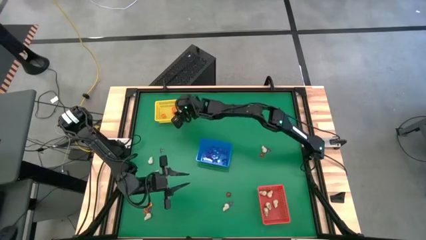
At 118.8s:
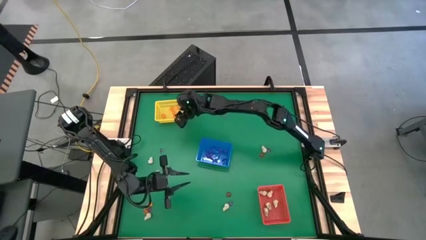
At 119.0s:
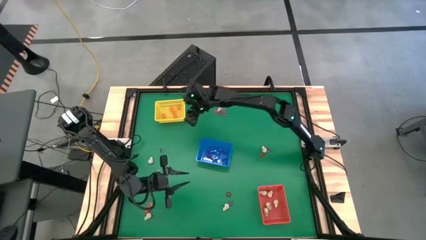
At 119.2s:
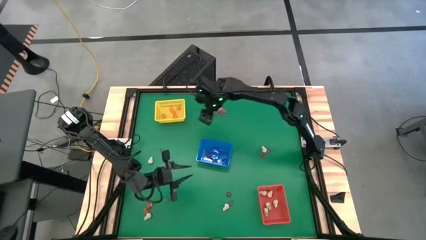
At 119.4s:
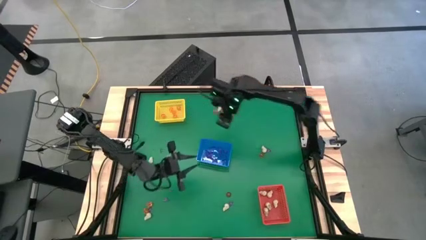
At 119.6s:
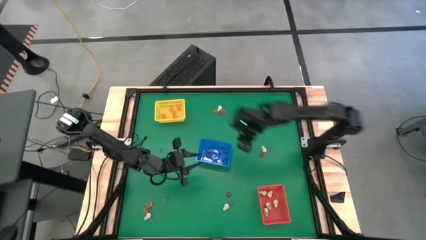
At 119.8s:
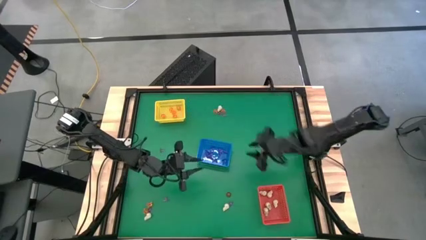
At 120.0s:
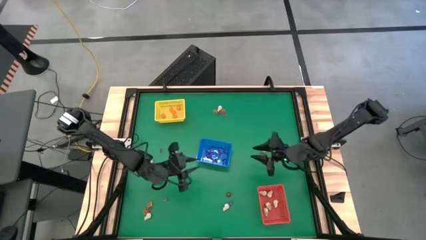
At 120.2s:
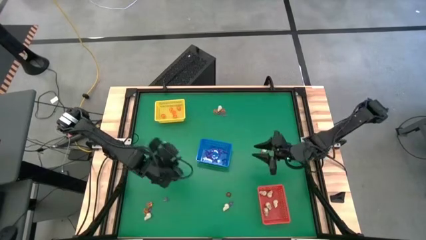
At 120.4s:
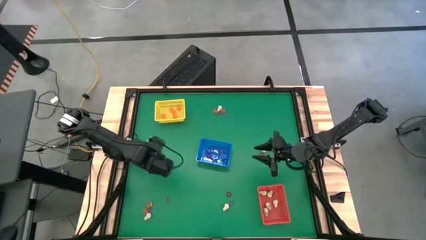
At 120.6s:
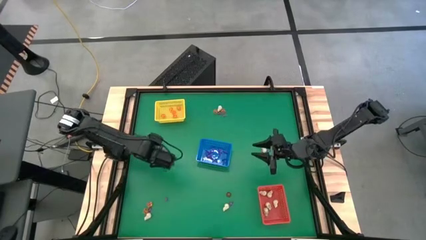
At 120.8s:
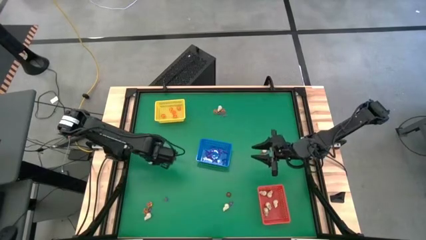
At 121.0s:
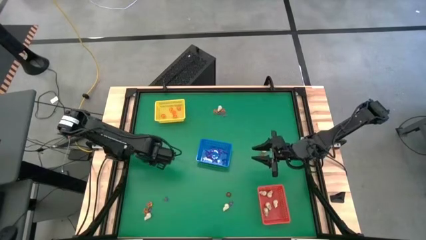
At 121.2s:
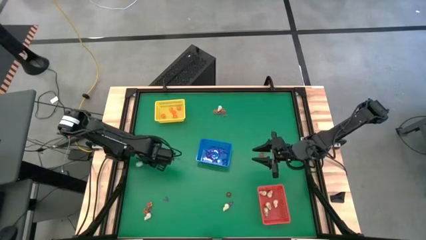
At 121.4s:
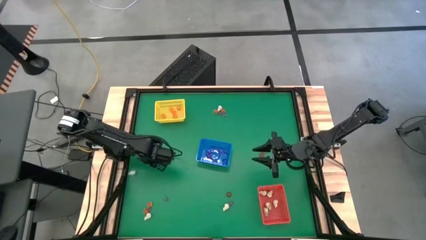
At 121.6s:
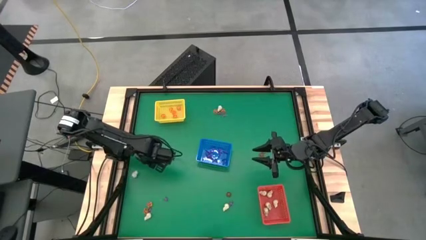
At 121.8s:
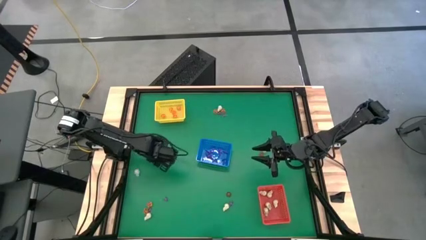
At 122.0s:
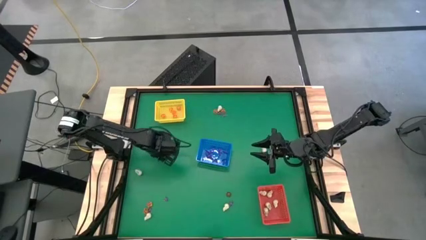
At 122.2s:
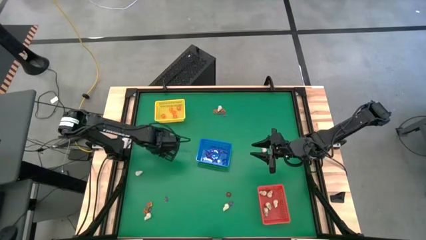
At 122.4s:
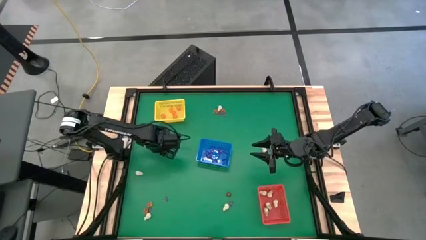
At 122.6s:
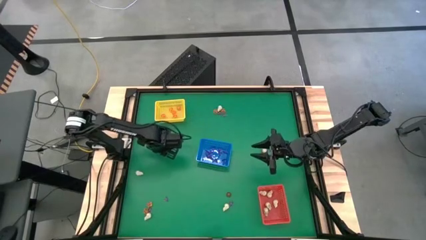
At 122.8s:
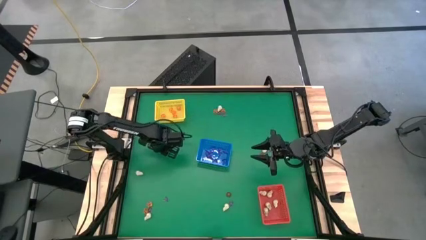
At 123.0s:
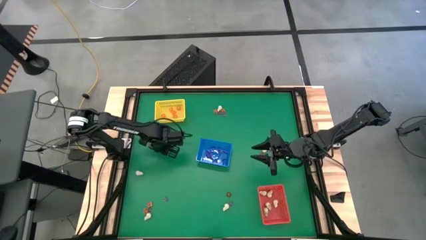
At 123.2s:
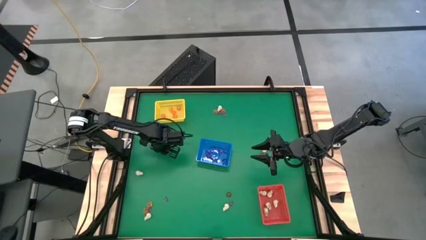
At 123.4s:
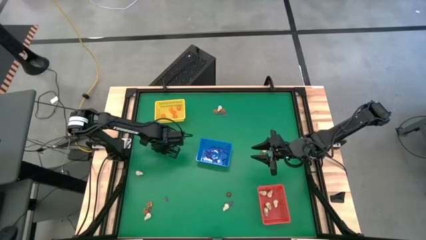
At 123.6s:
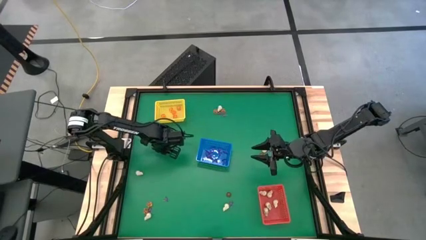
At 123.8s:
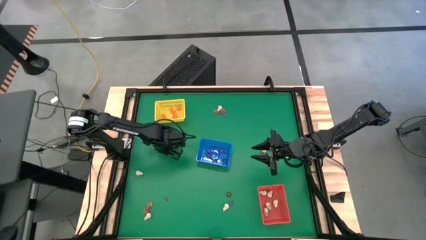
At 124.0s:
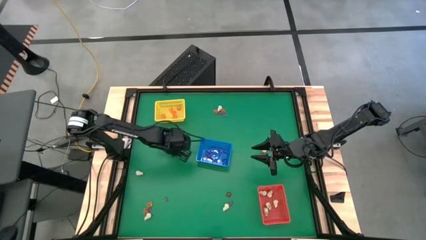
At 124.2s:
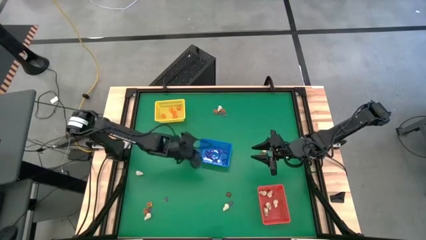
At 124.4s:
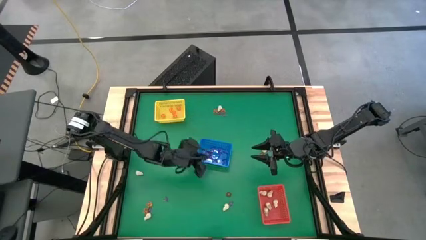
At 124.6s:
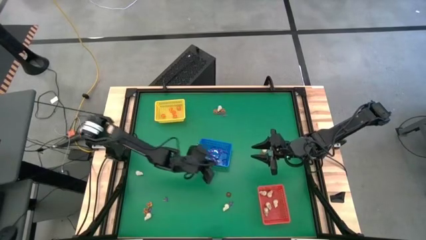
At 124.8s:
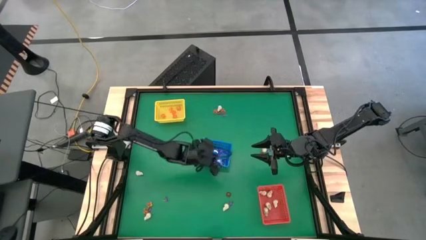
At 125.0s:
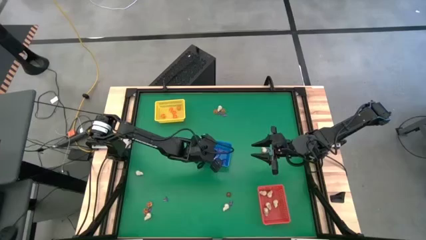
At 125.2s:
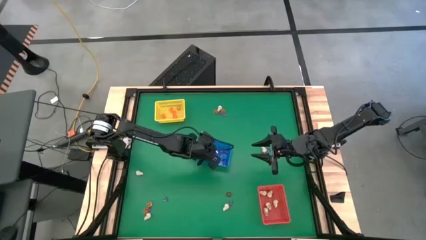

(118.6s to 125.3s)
Task: Sort Halloween decoration
Put the witch hat toy into the blue bin

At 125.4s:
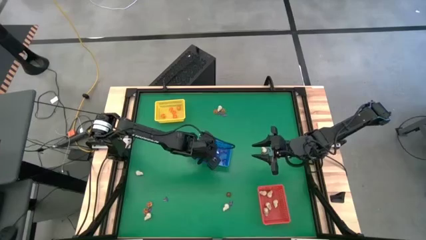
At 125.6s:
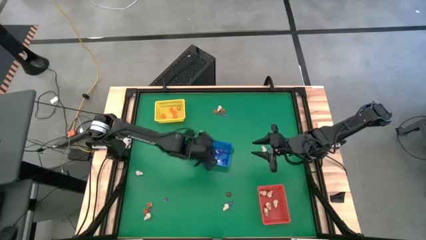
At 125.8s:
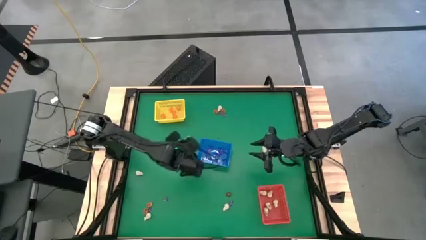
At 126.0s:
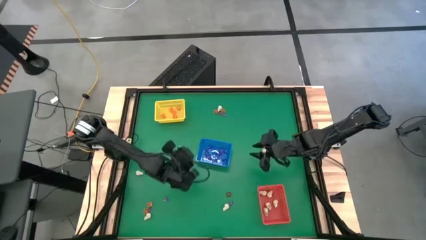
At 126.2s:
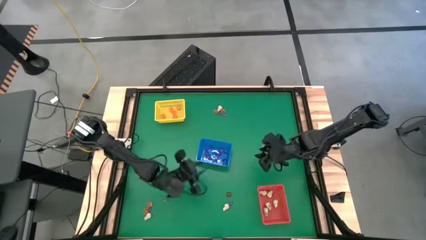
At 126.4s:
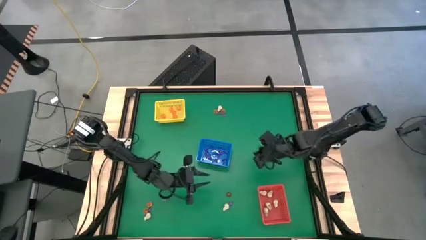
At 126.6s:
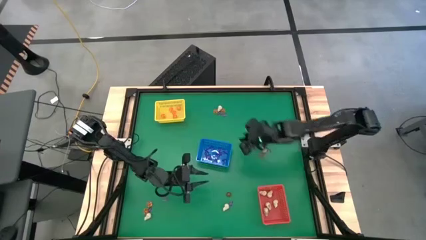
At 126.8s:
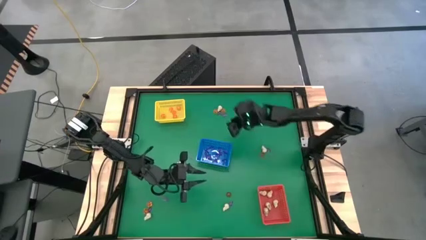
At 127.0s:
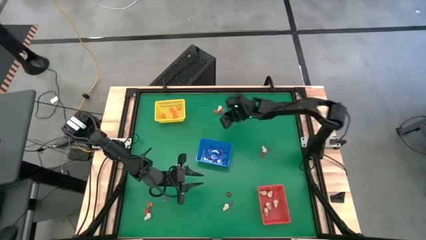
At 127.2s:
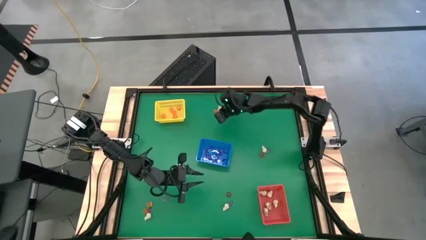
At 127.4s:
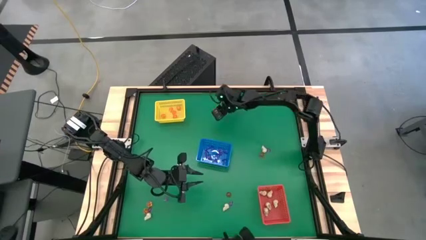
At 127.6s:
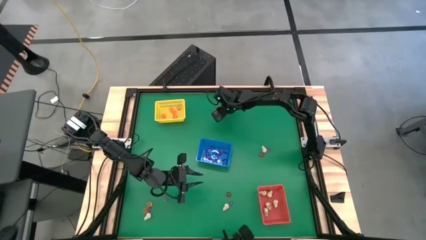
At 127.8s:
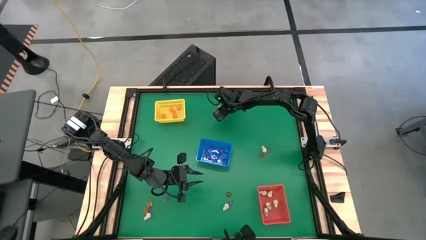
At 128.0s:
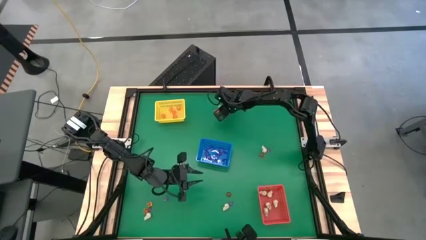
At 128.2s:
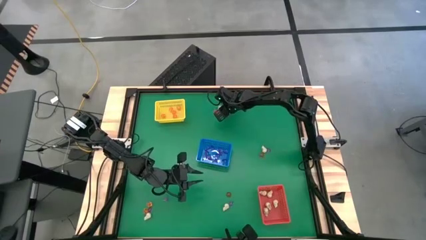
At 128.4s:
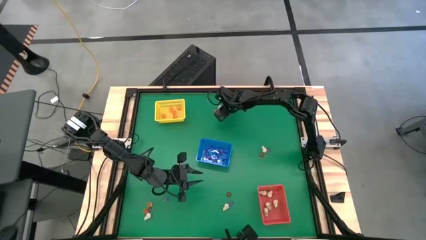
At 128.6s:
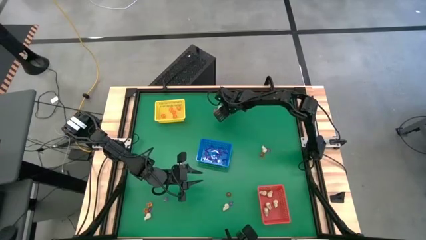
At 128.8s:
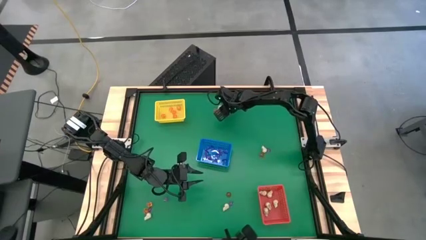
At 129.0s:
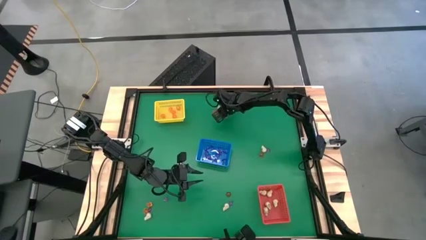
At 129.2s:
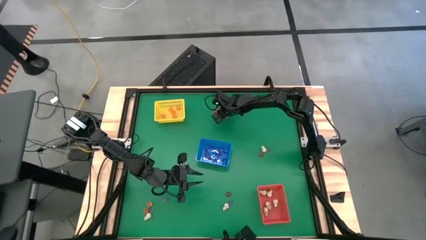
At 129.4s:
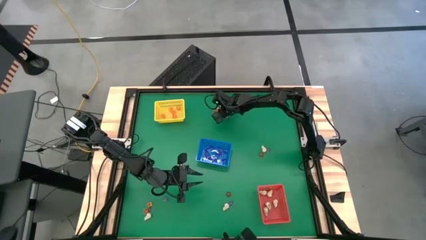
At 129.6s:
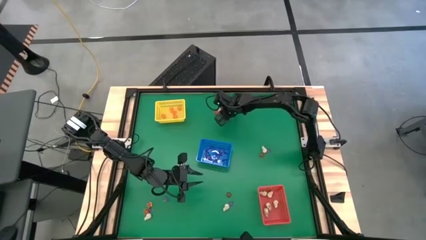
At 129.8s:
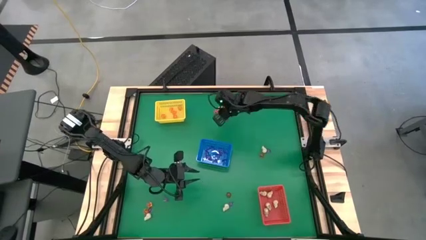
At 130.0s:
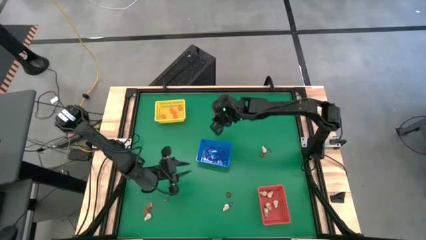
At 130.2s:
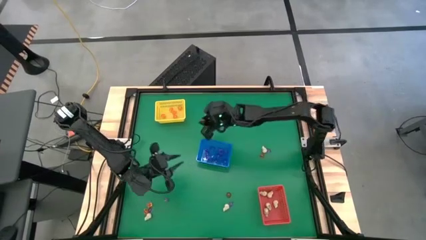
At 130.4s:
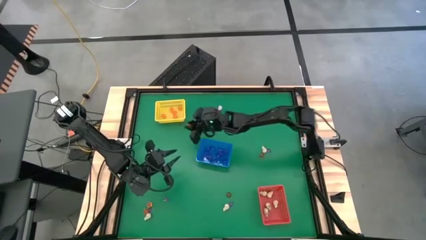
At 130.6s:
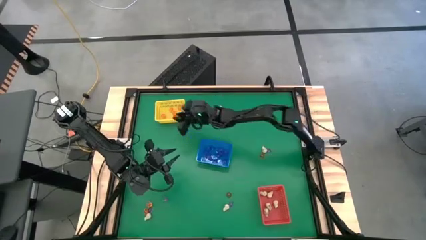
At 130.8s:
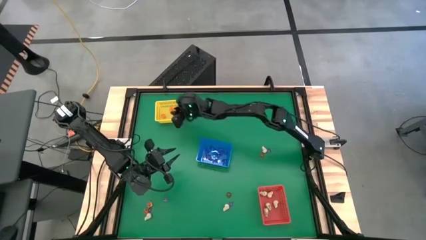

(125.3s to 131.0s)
Put the pumpkin toy into the yellow bin

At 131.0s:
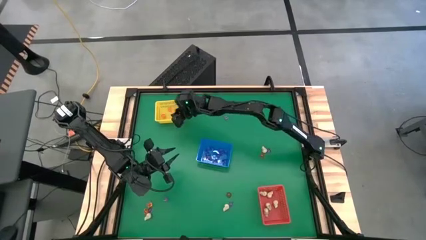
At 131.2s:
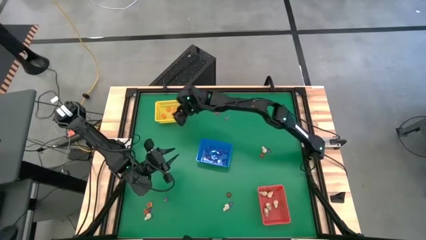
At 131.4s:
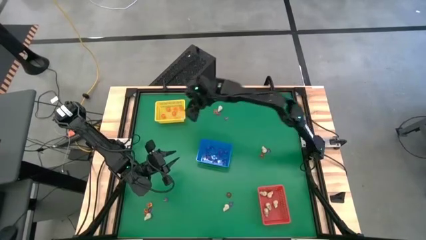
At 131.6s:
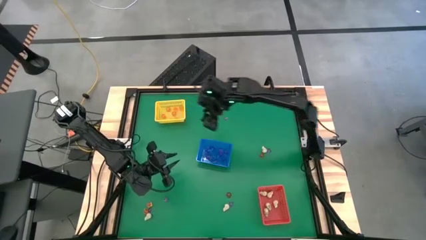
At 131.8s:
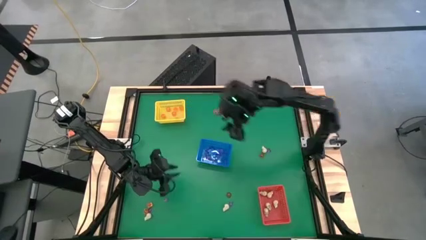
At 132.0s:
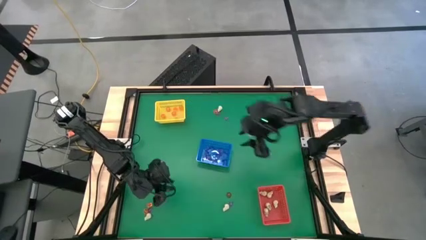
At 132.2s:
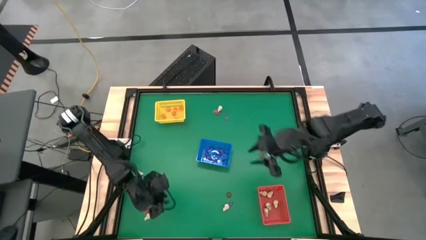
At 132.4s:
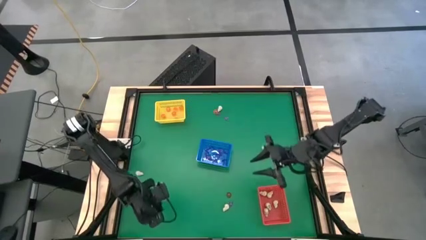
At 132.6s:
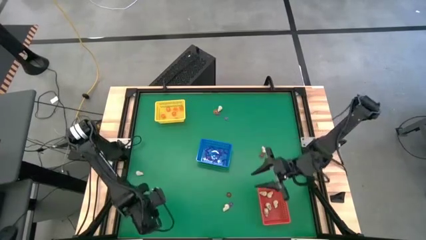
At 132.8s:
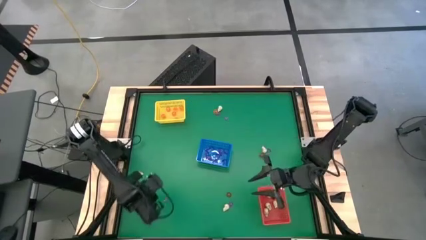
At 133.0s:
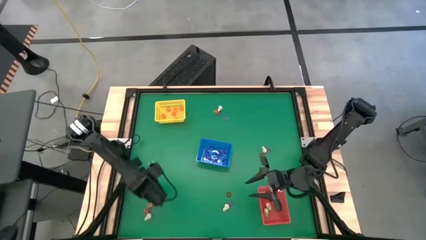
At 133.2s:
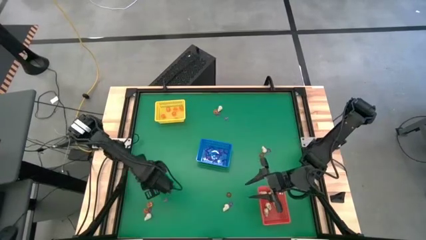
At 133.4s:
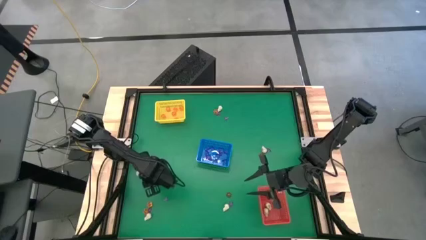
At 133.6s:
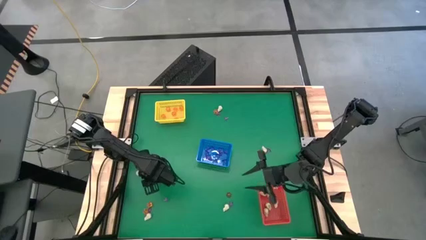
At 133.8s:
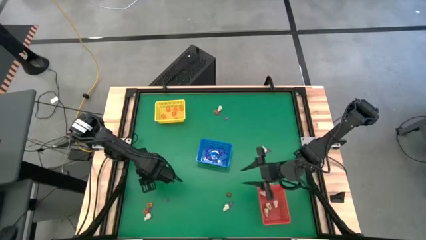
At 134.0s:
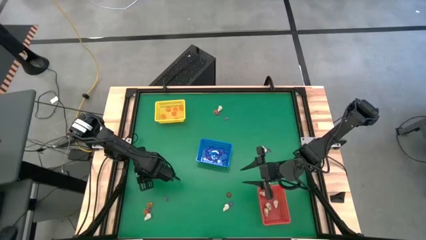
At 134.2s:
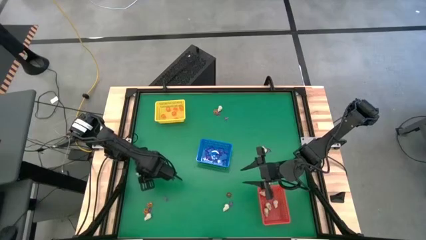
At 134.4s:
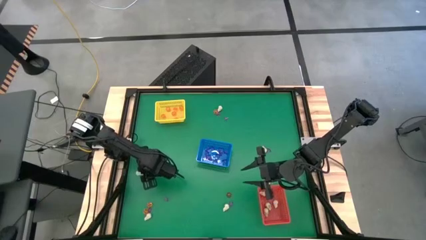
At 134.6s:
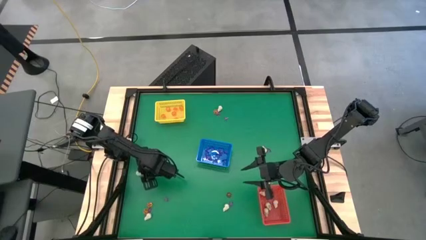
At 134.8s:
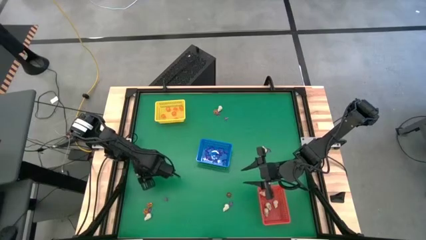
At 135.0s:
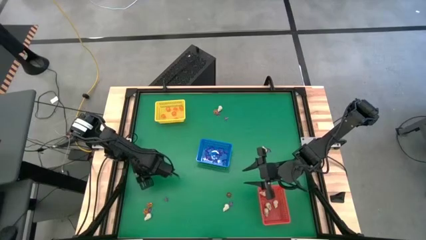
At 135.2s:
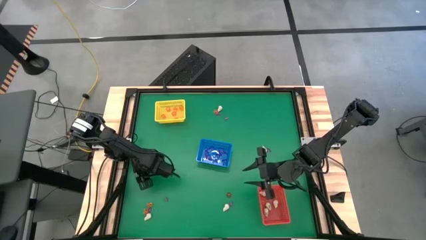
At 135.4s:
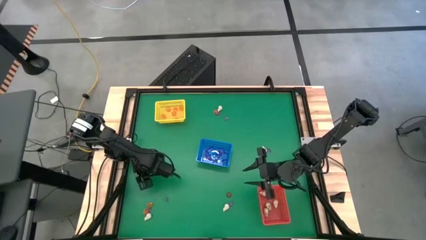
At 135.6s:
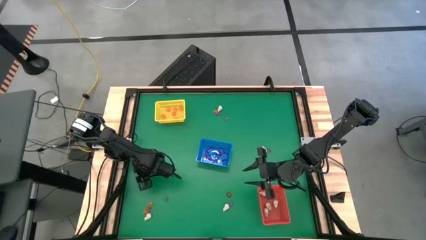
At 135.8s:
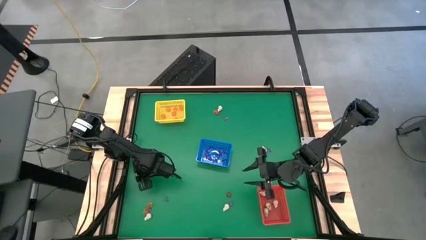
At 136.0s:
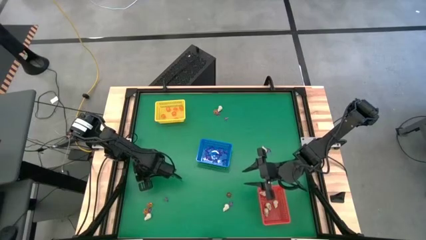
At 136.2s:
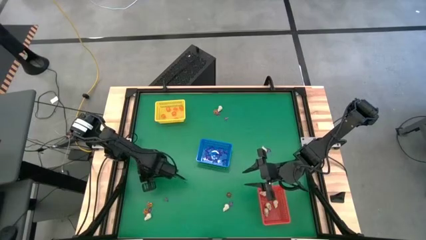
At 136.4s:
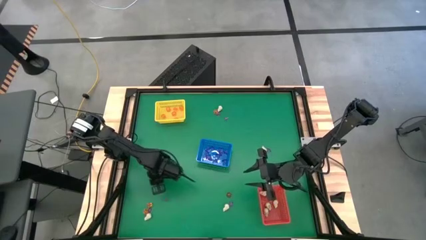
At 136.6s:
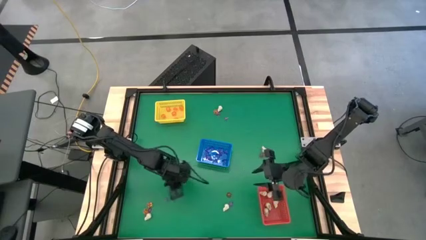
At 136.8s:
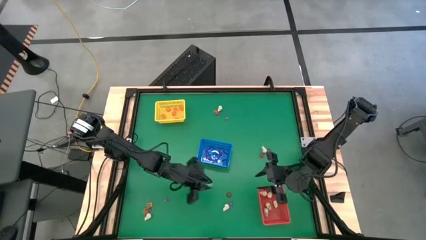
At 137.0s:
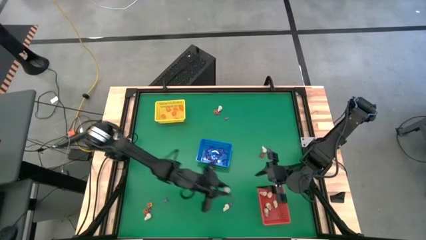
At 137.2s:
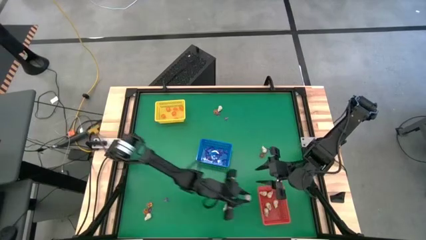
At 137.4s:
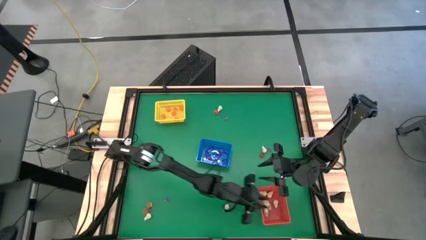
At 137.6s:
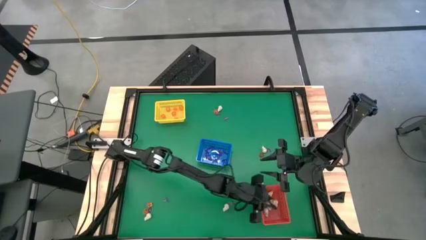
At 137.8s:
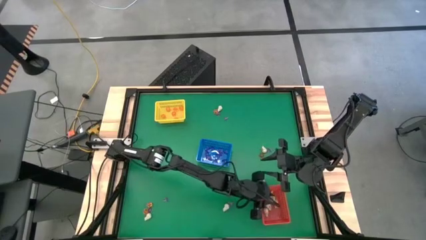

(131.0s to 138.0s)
Put the skull toy into the red bin
